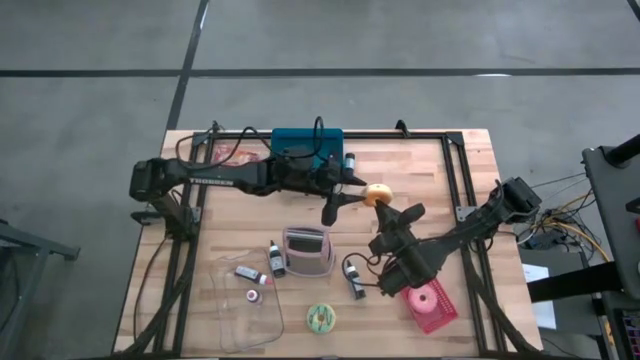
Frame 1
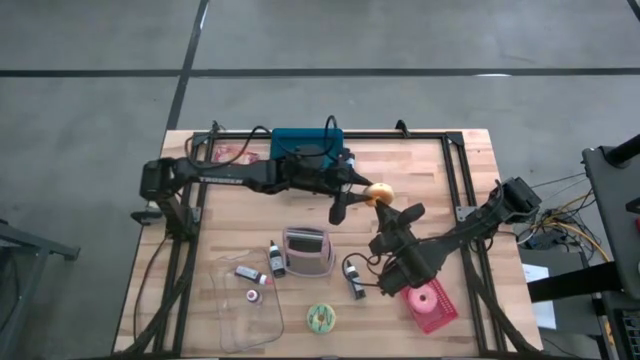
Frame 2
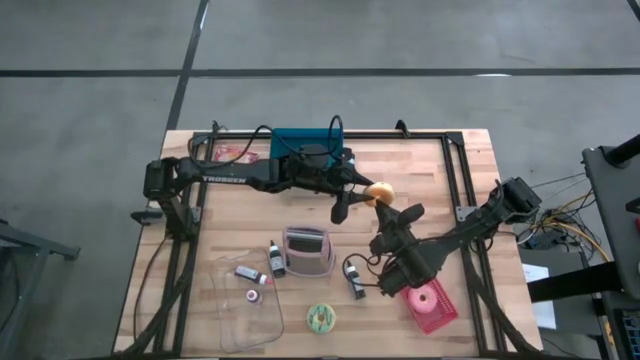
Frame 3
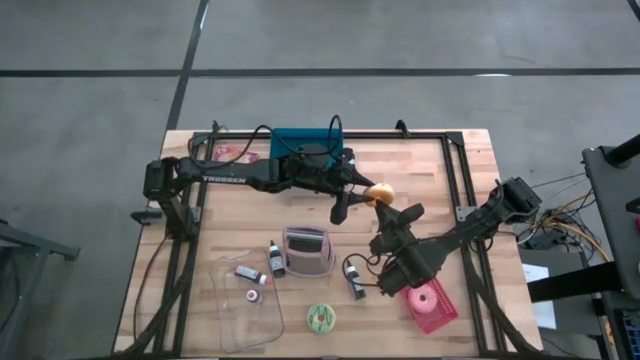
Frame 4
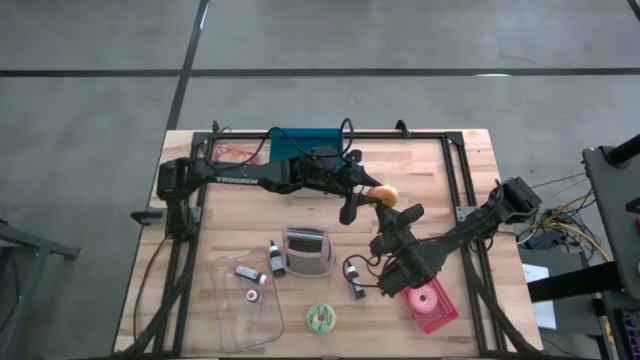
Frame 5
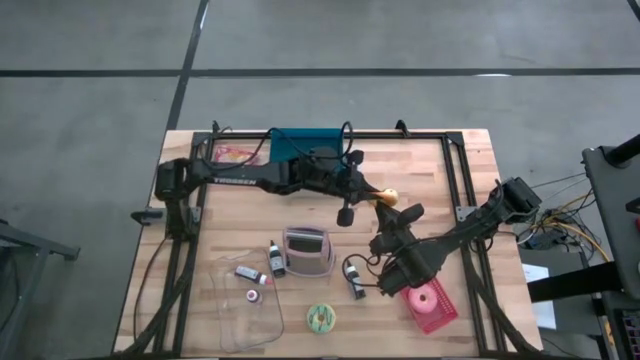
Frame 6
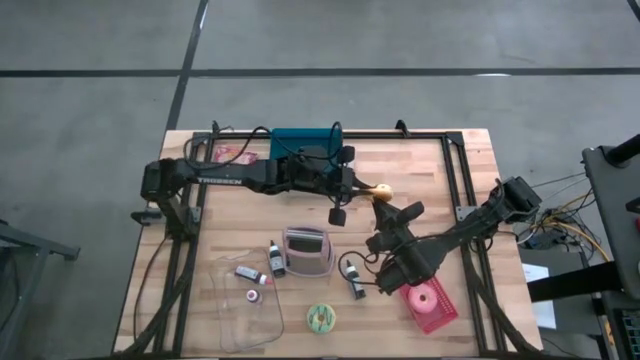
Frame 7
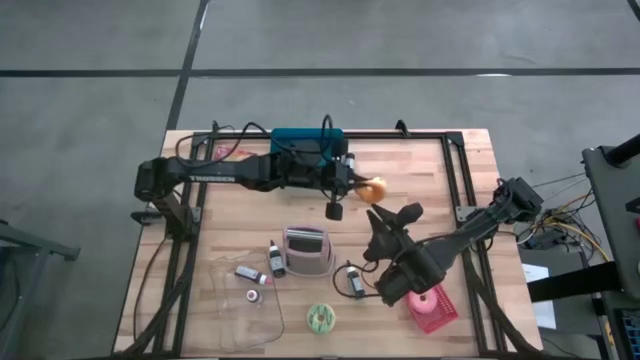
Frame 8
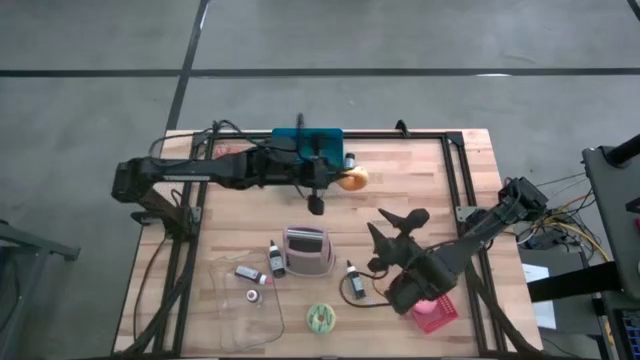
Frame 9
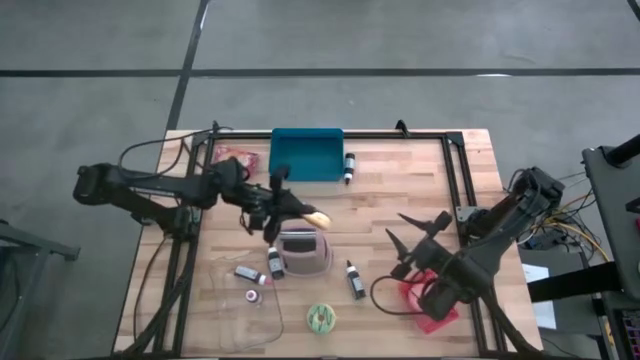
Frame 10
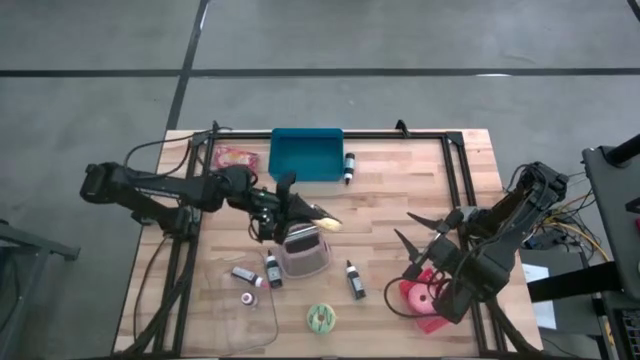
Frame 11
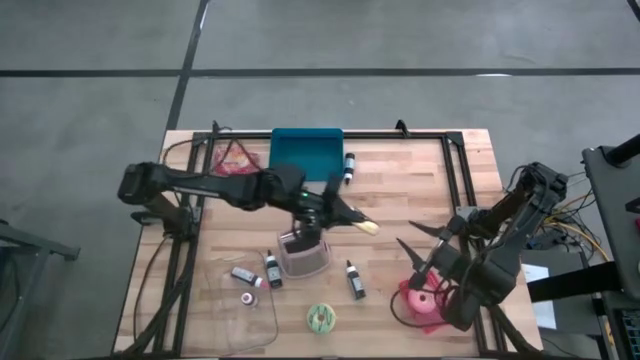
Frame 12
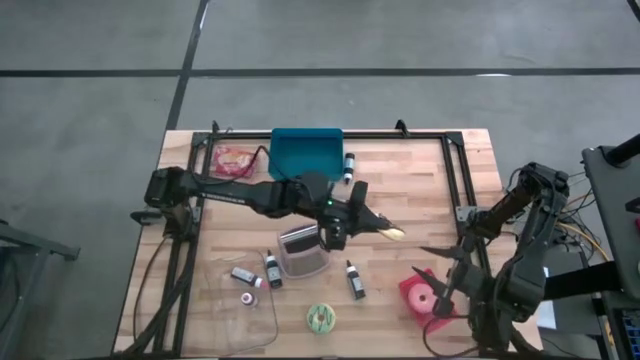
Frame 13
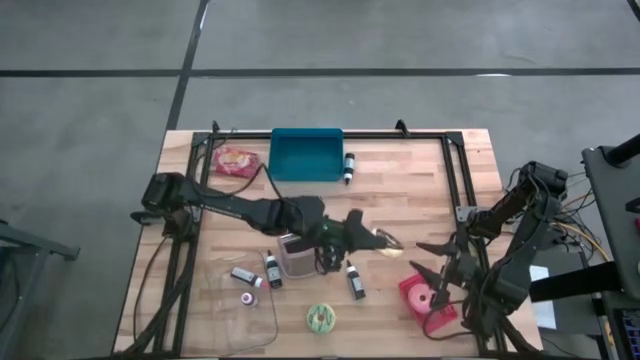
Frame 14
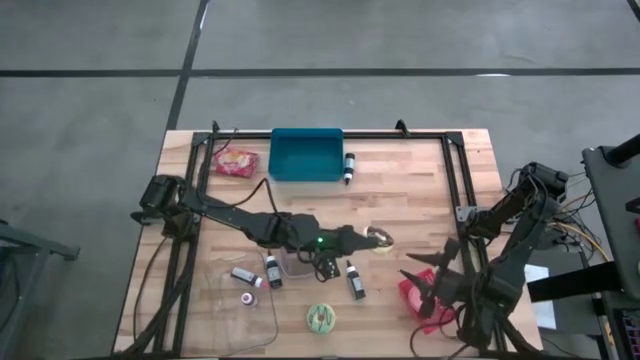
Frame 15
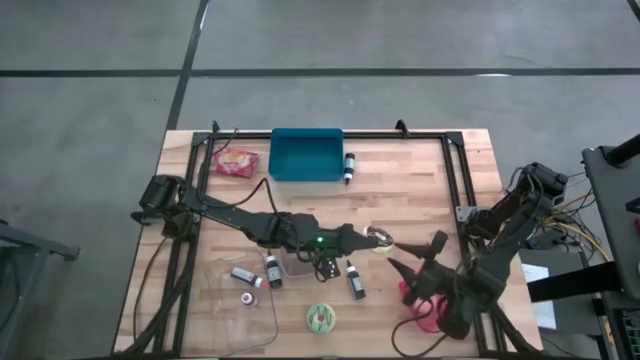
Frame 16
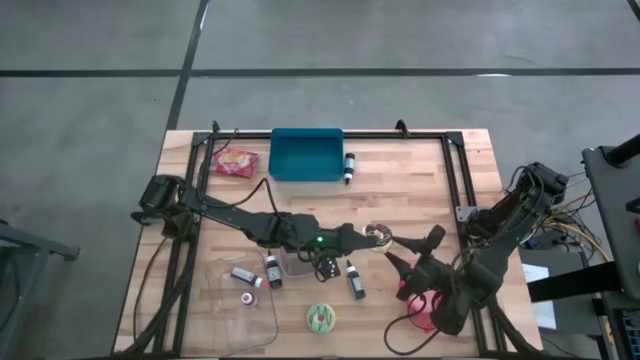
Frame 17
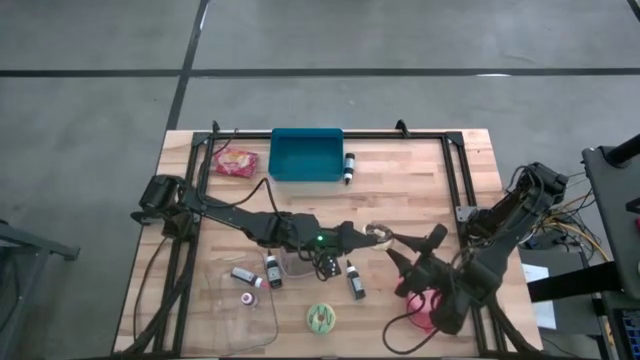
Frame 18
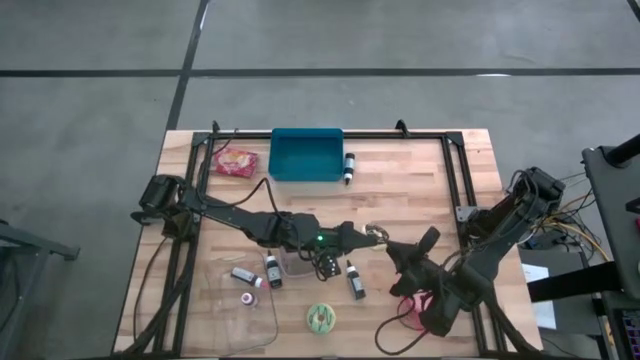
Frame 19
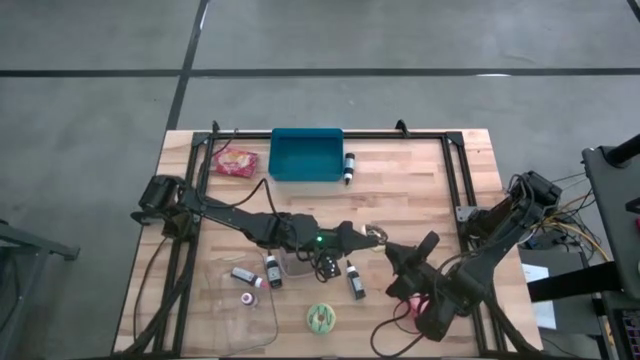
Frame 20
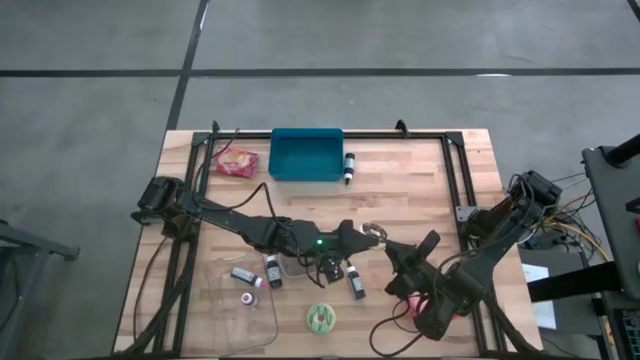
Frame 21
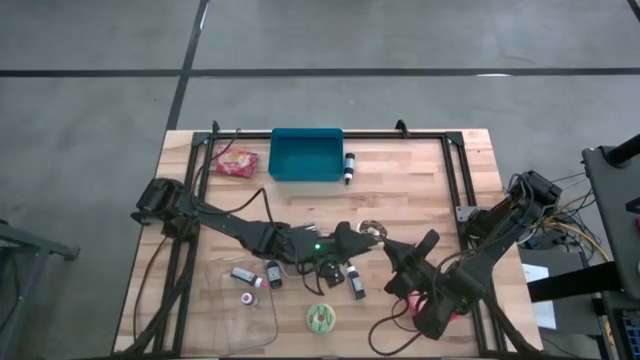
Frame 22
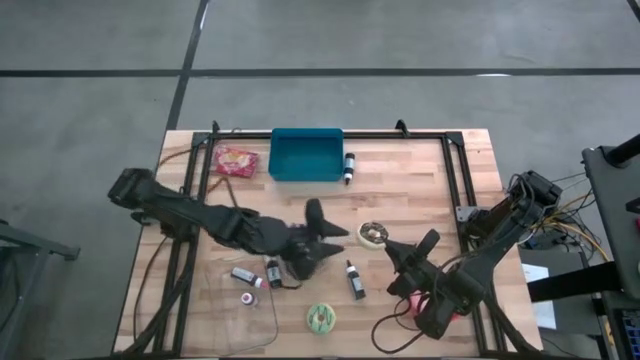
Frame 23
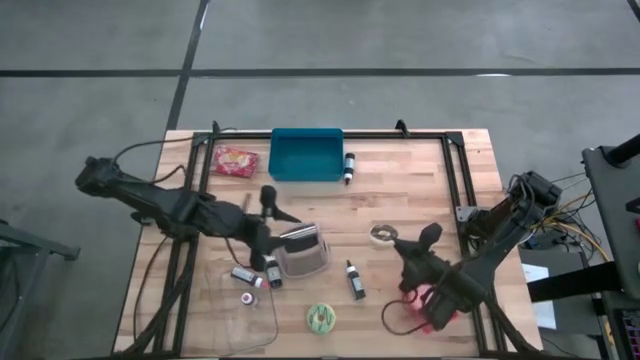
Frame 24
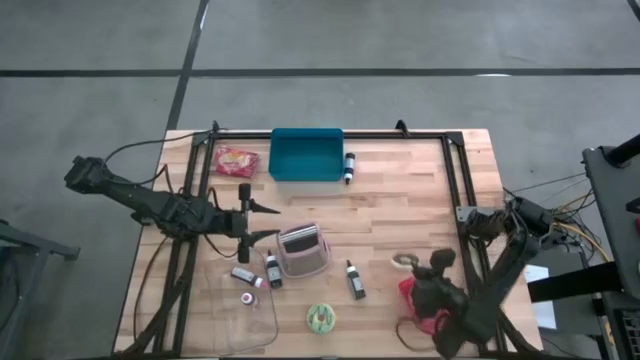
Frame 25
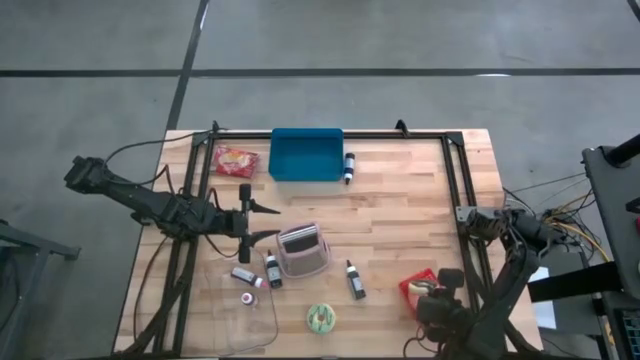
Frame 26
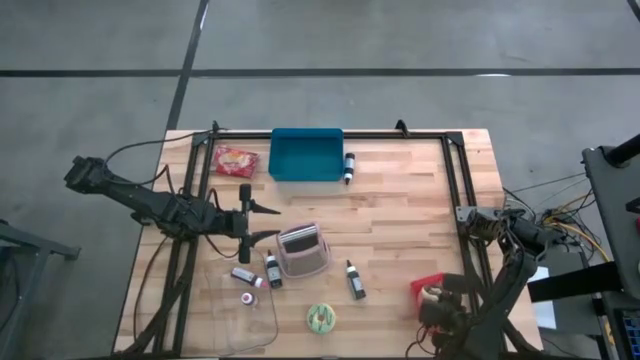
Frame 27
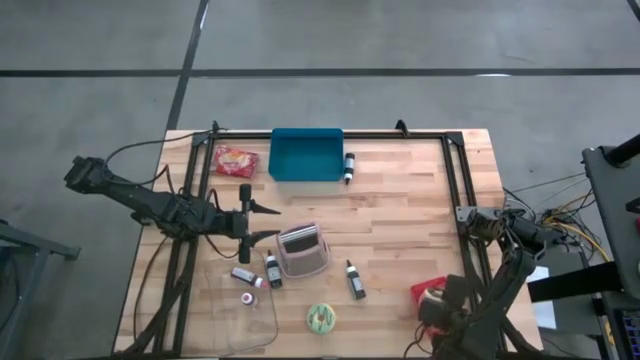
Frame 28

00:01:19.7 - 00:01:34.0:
Task: Pick & Place Food Item
Put the black donut into the red bin

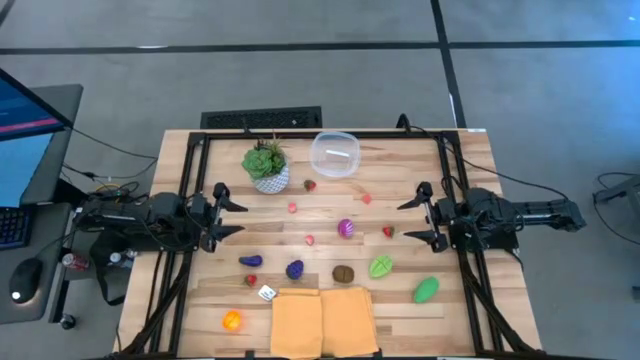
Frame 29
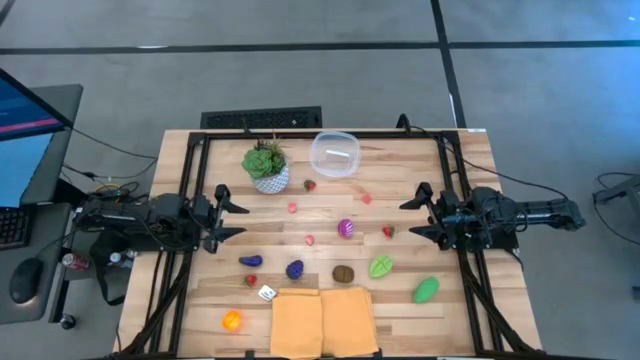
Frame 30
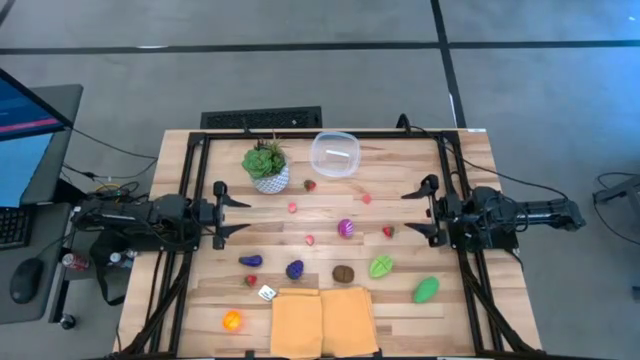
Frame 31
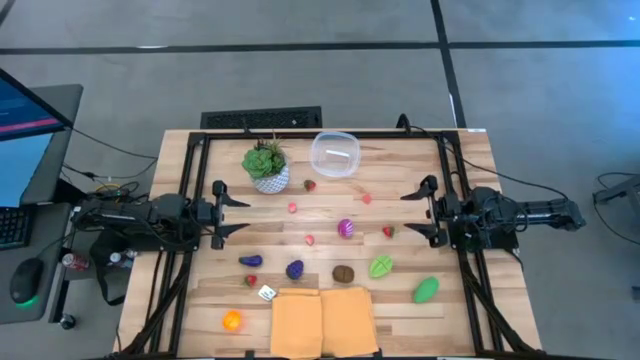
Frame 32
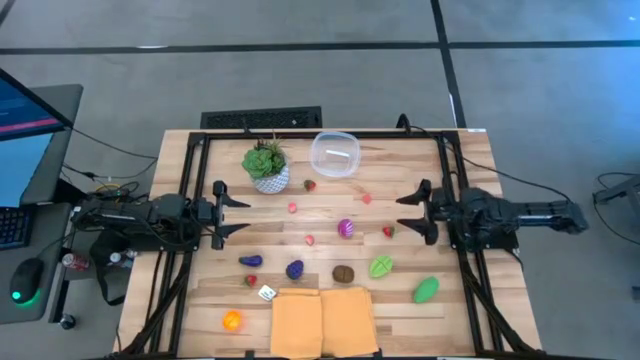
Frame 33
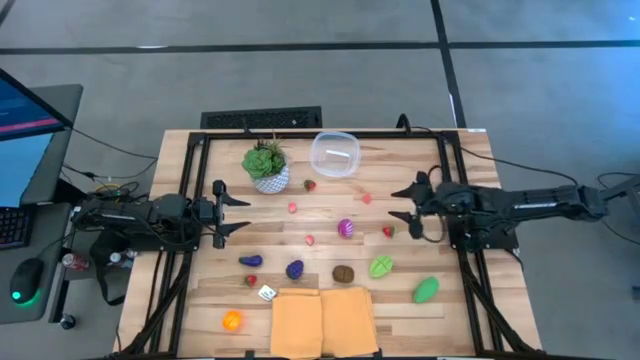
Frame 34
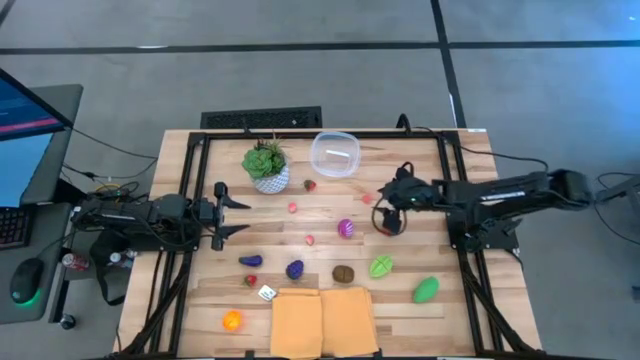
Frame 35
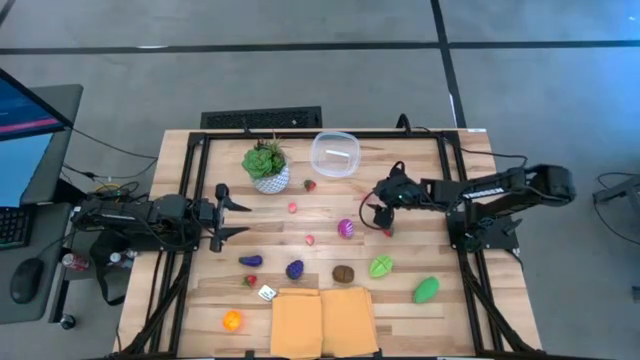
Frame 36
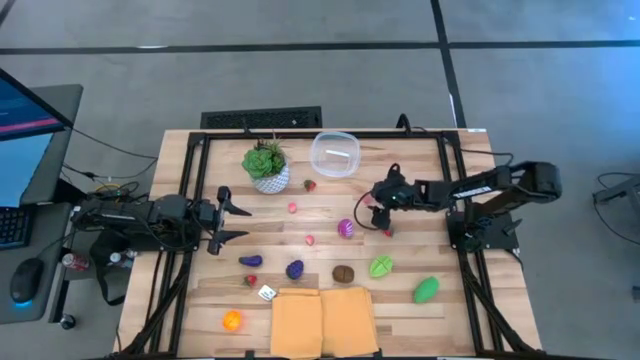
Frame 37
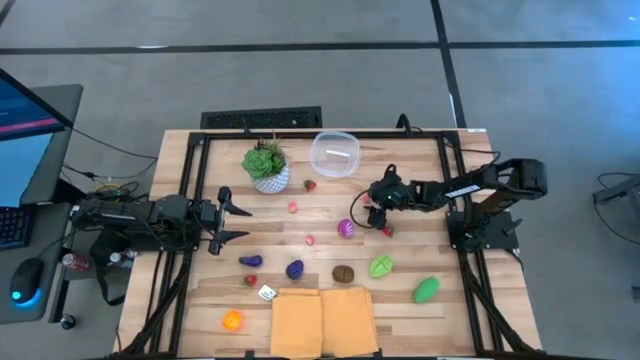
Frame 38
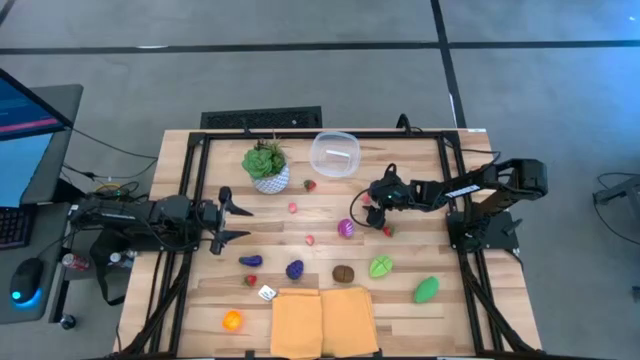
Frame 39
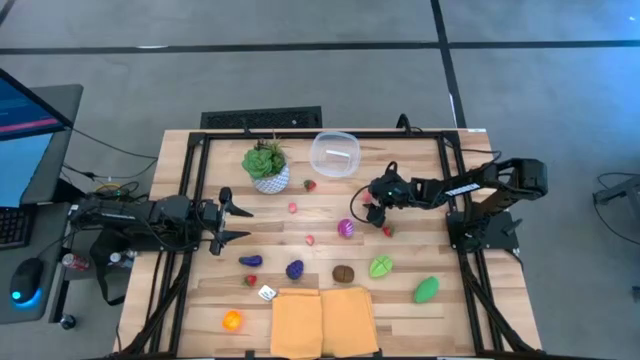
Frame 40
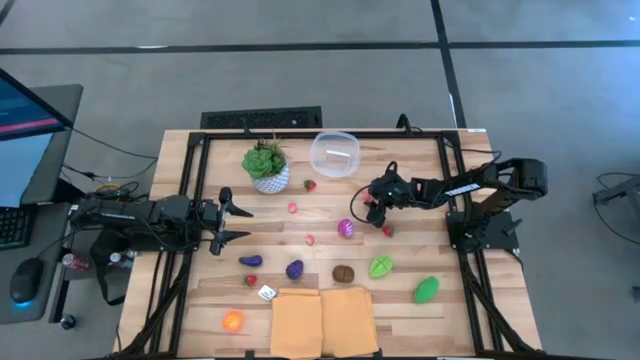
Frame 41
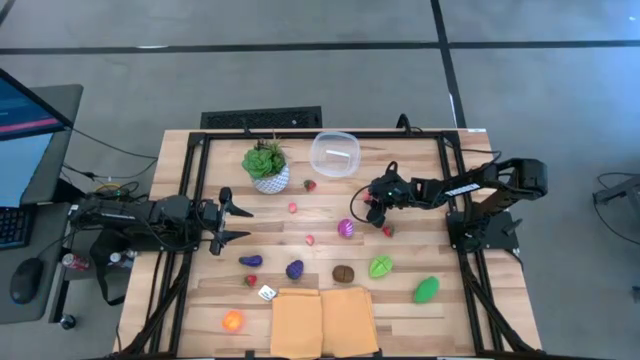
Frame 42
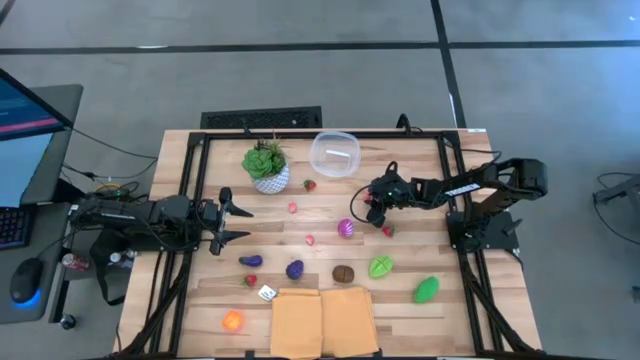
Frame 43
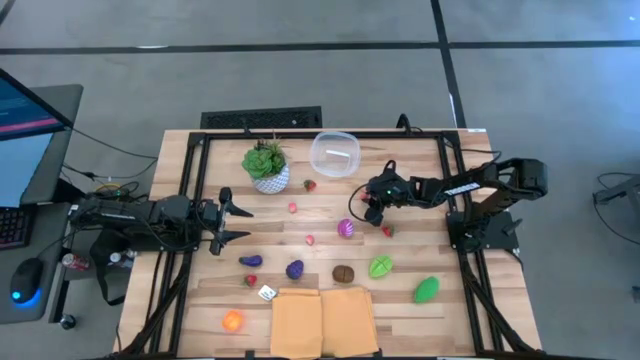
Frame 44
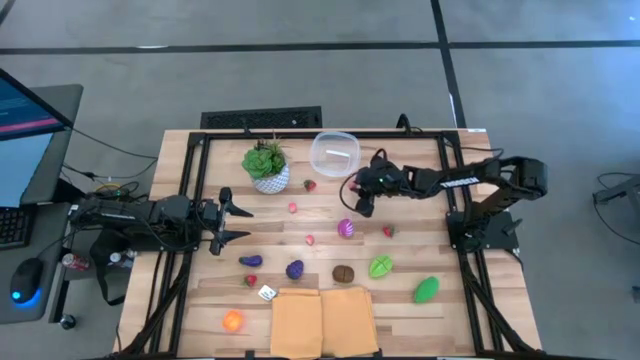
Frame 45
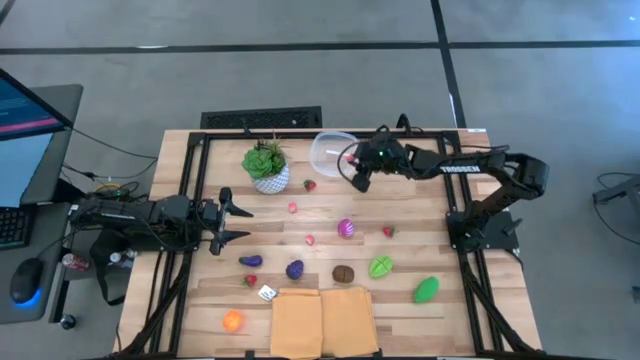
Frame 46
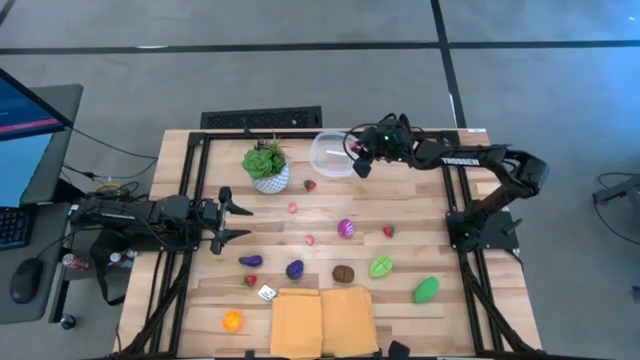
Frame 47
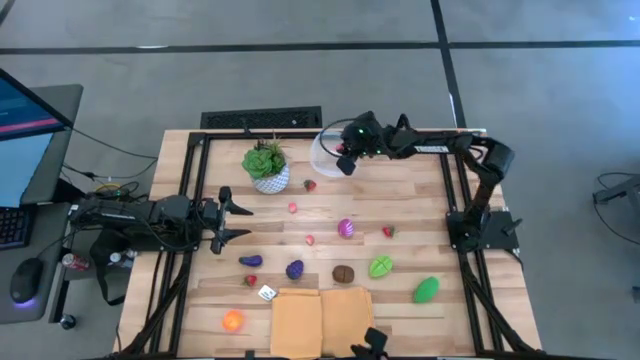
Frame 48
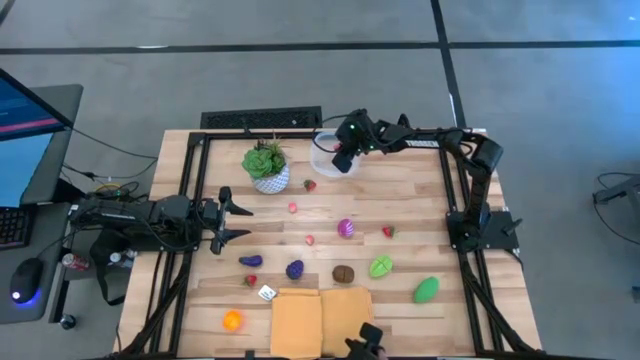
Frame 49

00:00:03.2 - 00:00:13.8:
Task: Pick and placing Produce into tupperware
Put the top right peach into the transparent bin
